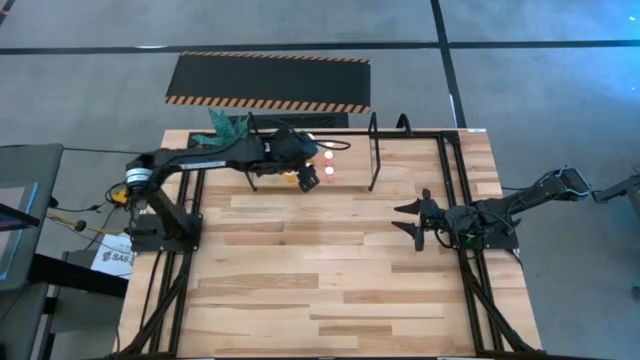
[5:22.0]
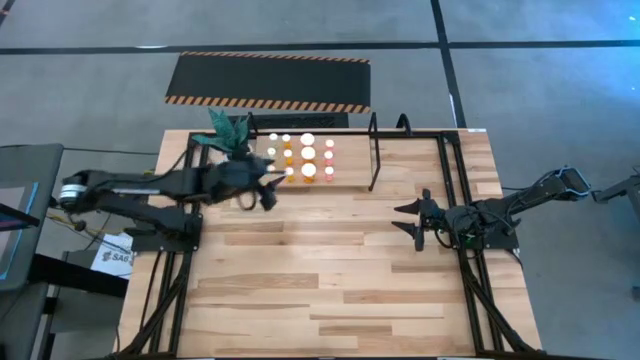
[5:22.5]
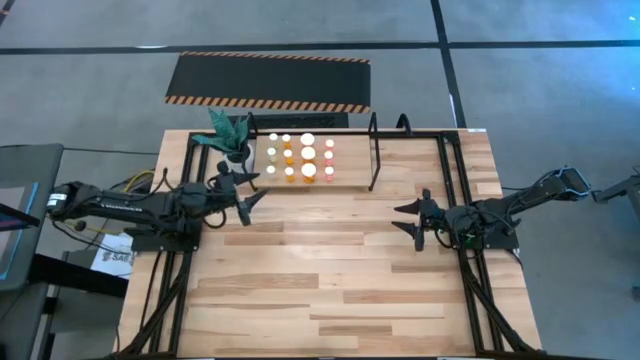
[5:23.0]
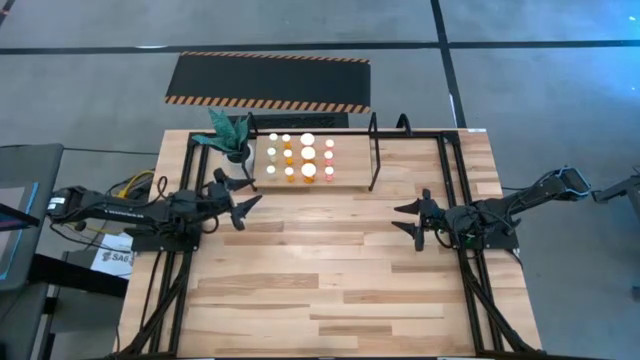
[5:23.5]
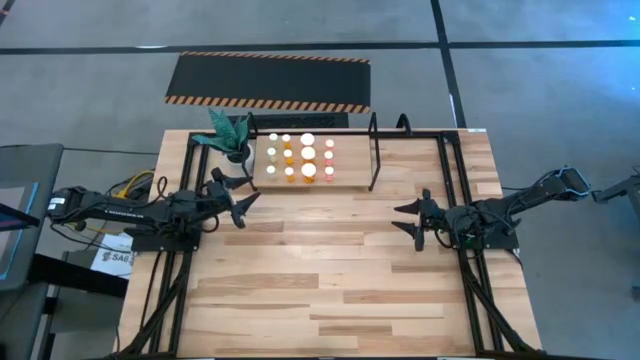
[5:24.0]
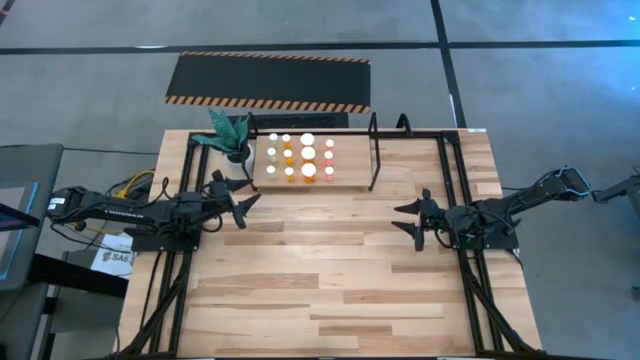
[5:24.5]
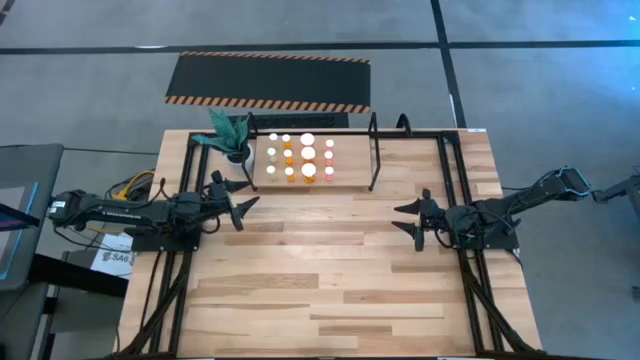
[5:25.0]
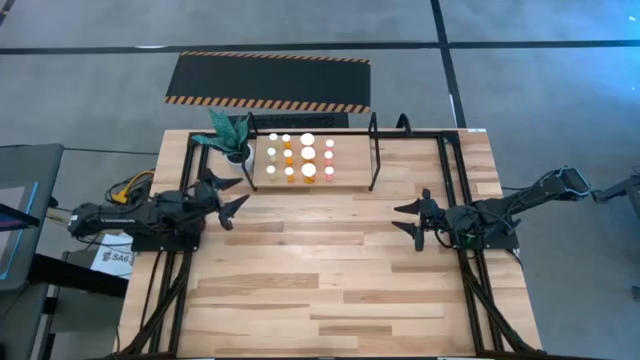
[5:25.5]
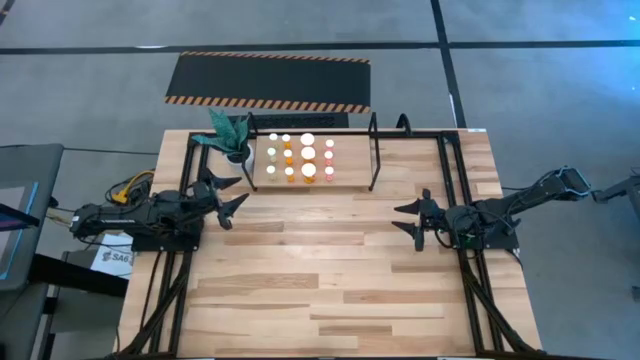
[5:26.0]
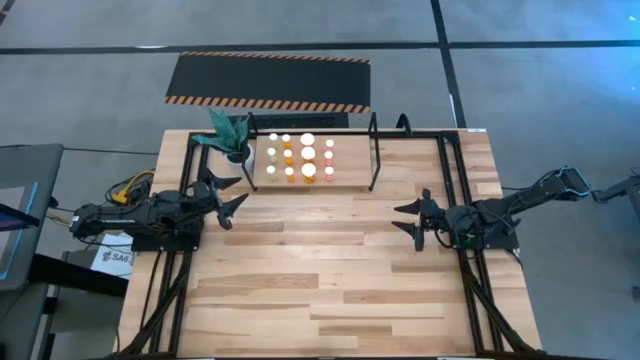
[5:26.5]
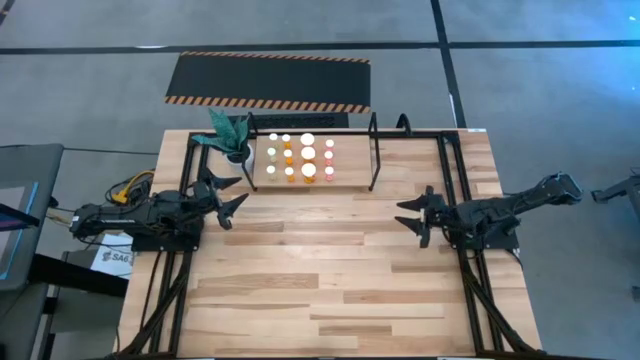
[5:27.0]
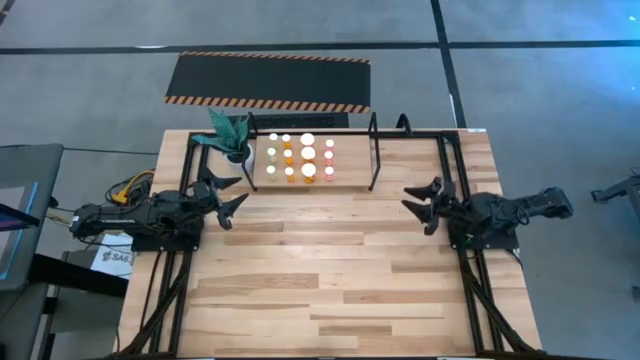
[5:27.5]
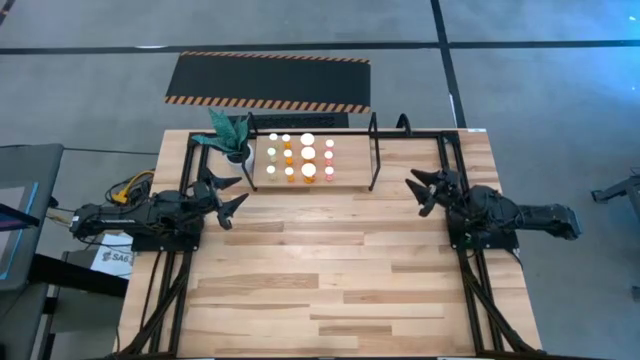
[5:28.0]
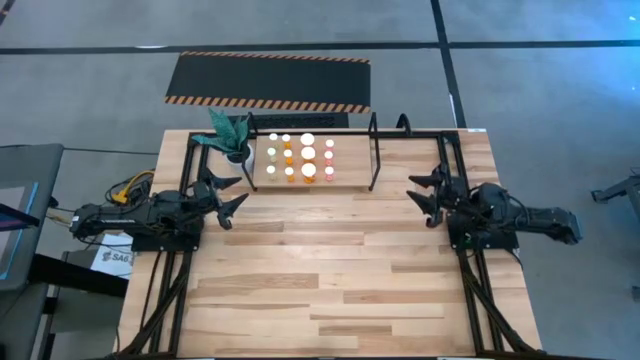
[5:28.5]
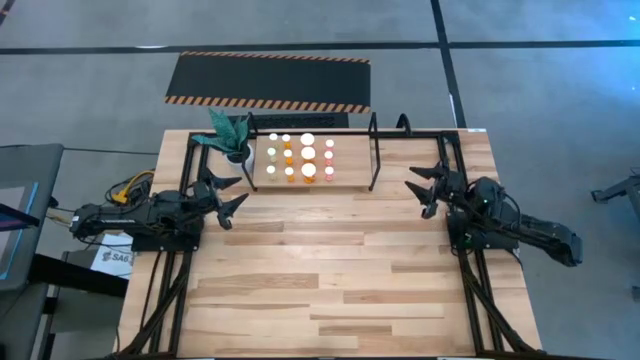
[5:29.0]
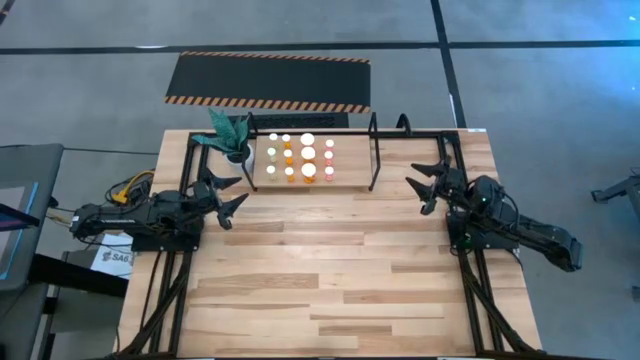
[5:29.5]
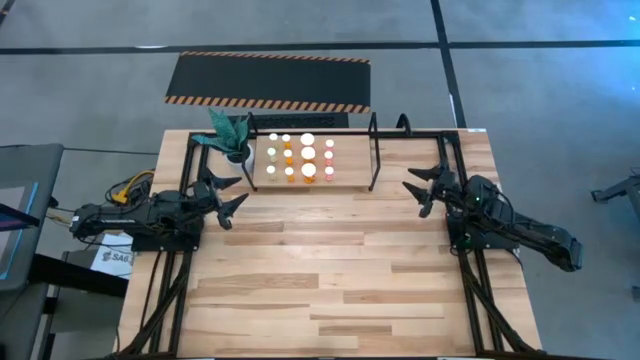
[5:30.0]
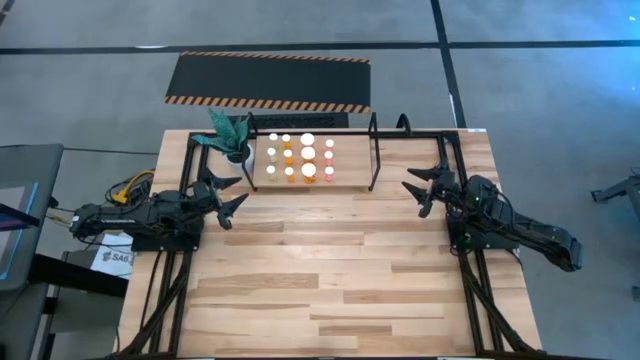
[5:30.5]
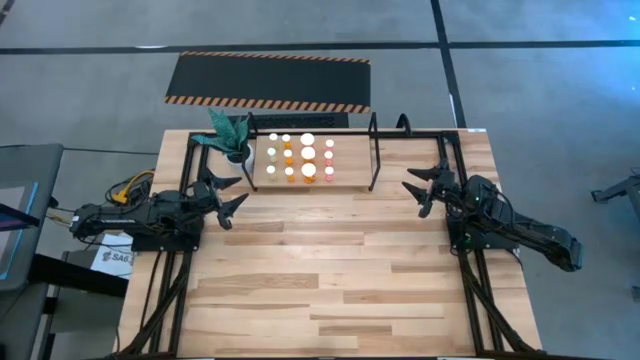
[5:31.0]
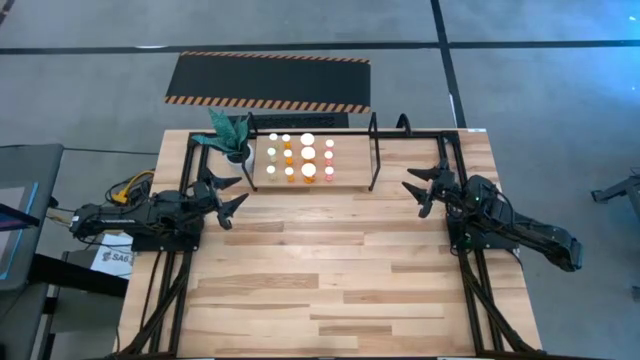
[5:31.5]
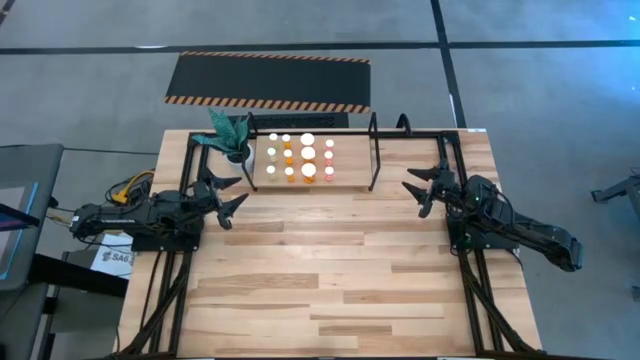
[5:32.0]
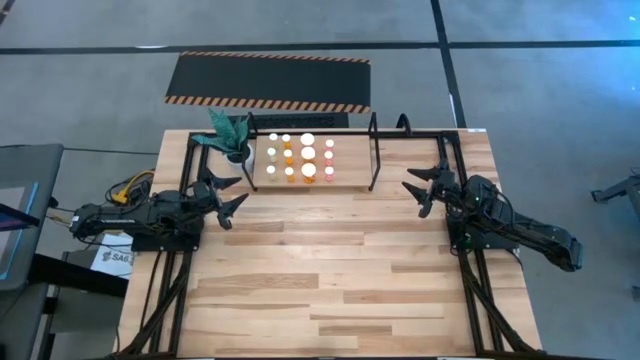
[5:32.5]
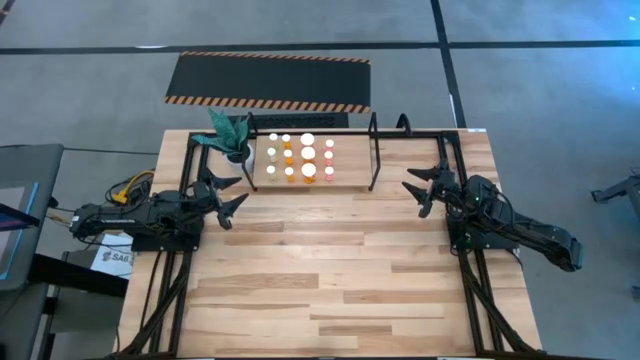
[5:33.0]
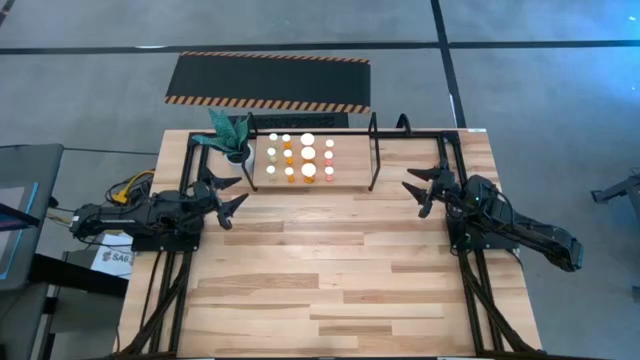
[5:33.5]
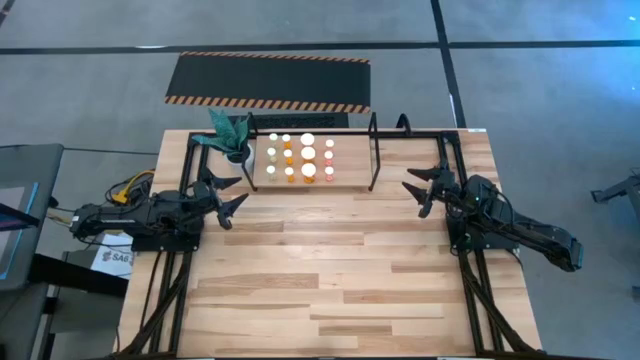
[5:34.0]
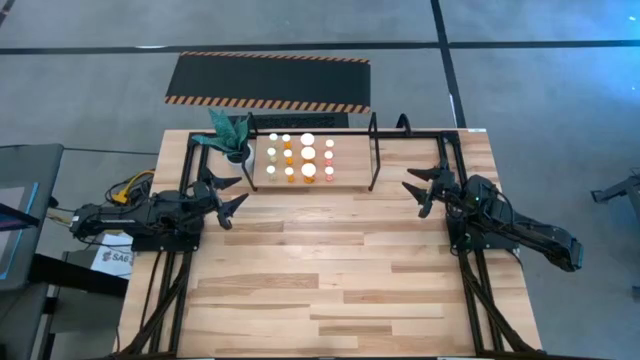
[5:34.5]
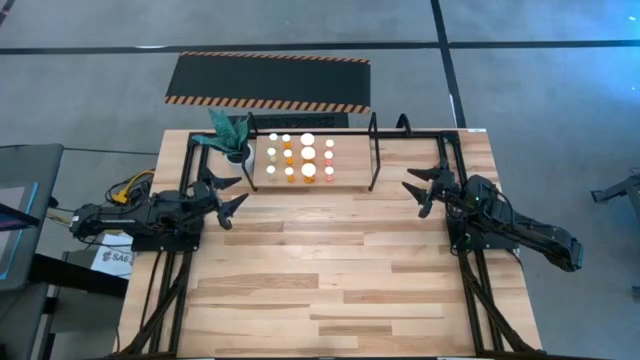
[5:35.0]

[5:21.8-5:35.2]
Task: Pick and place medicine bottles onto shelf by color
Return to Home Position
